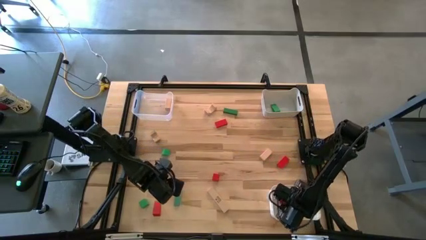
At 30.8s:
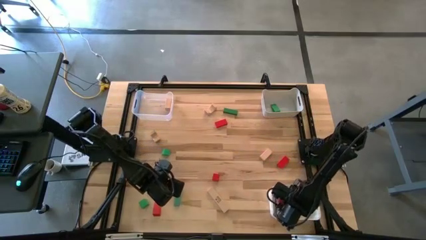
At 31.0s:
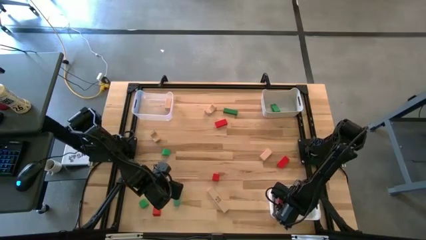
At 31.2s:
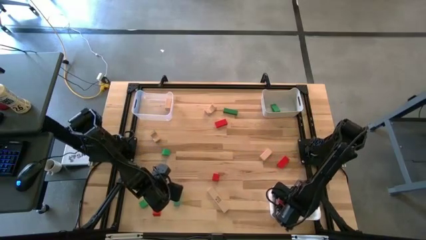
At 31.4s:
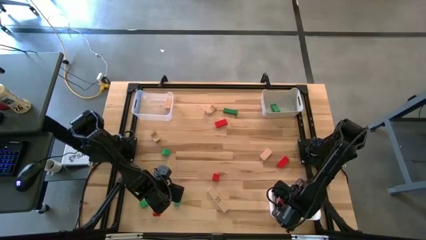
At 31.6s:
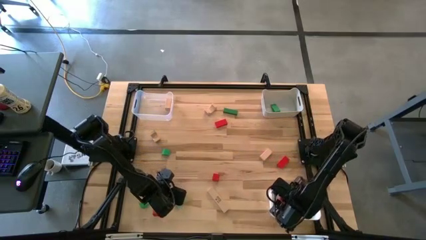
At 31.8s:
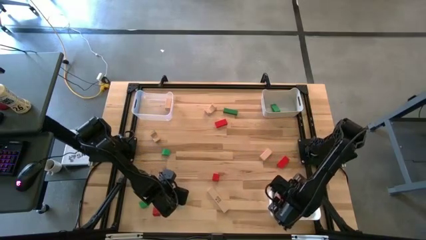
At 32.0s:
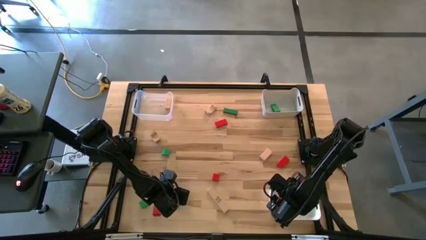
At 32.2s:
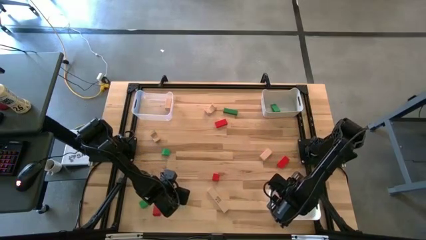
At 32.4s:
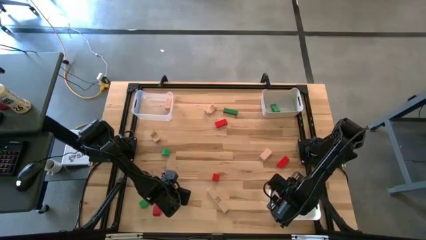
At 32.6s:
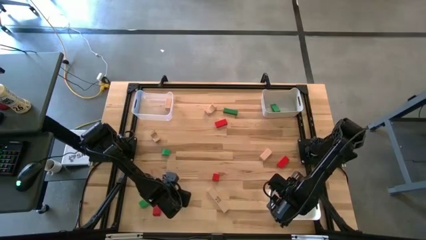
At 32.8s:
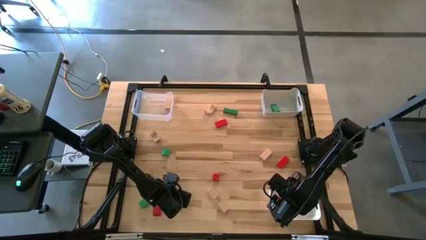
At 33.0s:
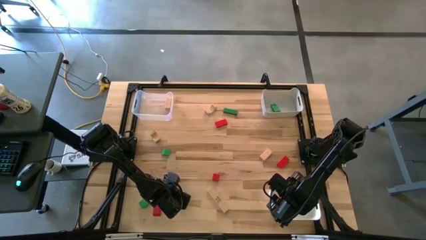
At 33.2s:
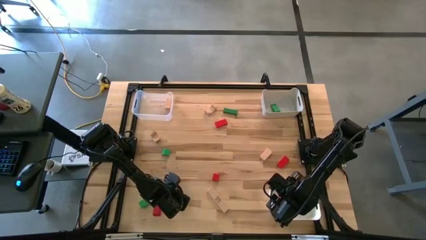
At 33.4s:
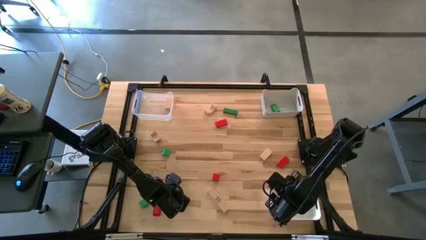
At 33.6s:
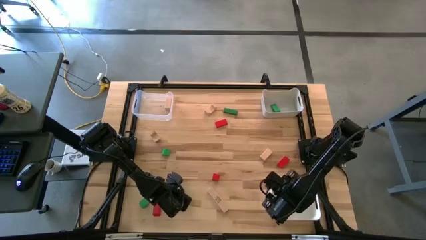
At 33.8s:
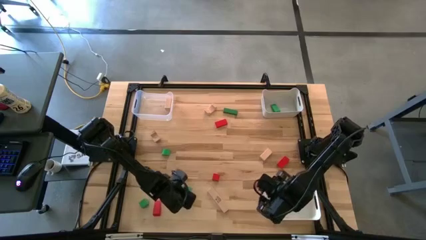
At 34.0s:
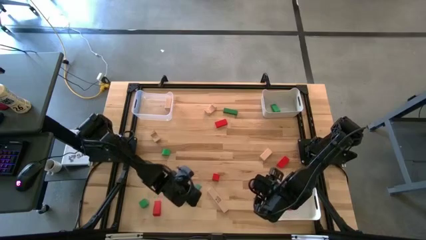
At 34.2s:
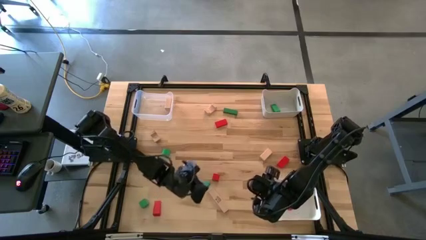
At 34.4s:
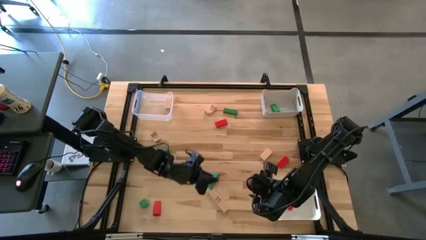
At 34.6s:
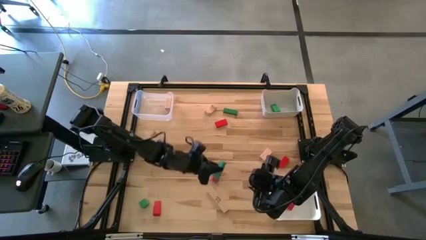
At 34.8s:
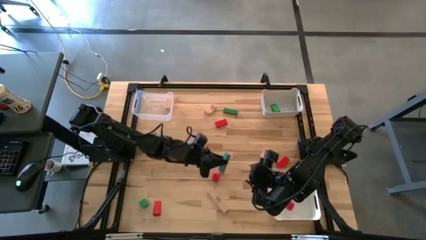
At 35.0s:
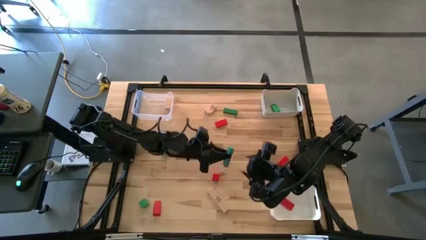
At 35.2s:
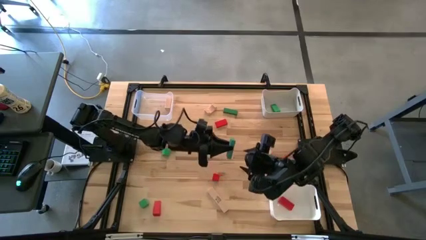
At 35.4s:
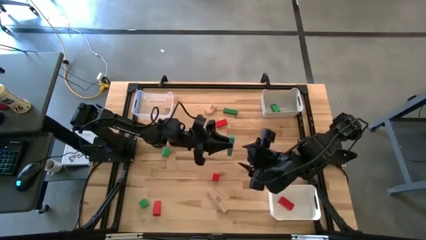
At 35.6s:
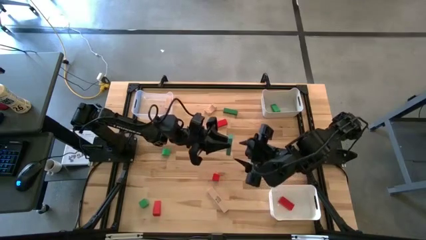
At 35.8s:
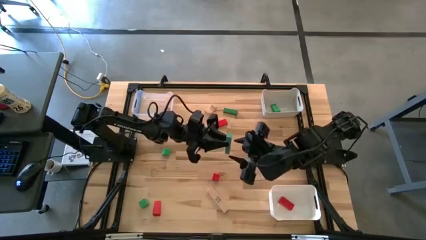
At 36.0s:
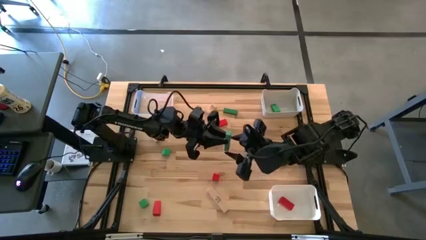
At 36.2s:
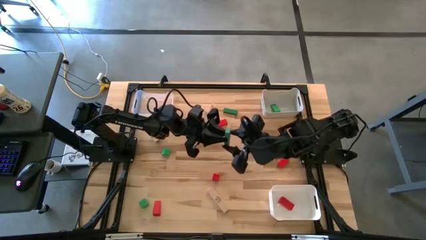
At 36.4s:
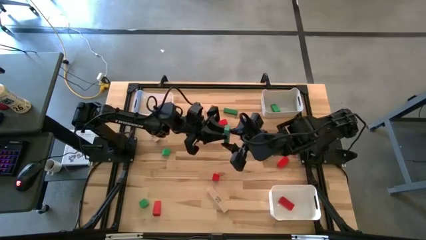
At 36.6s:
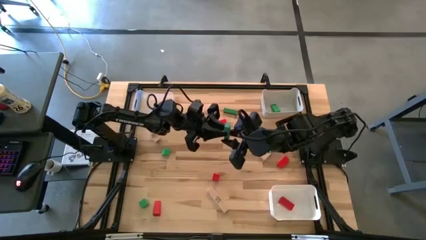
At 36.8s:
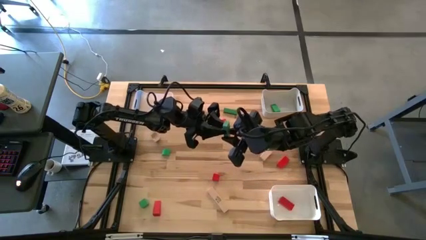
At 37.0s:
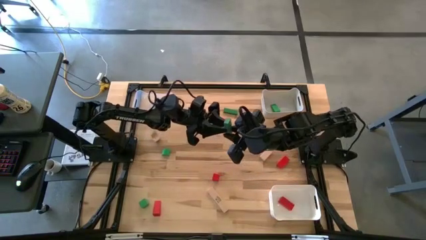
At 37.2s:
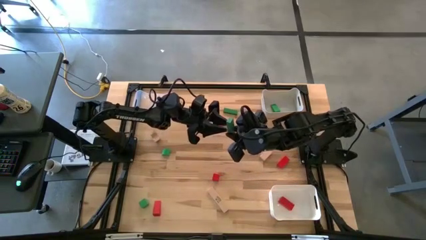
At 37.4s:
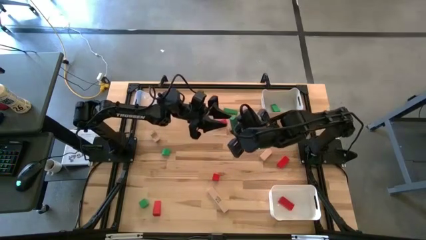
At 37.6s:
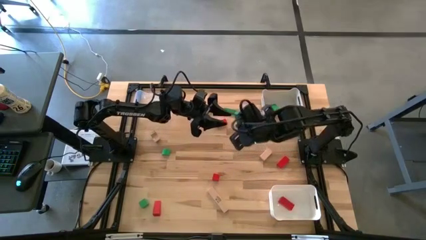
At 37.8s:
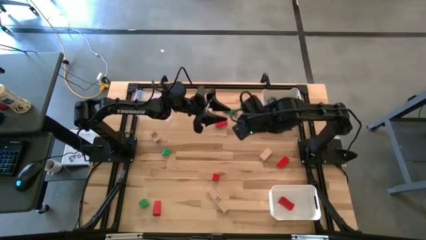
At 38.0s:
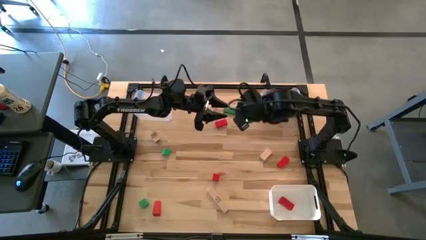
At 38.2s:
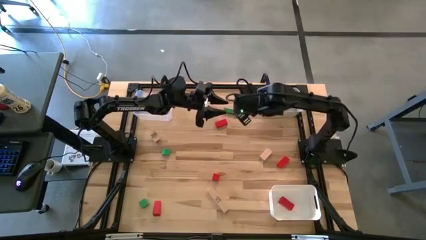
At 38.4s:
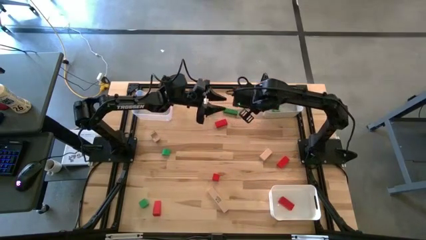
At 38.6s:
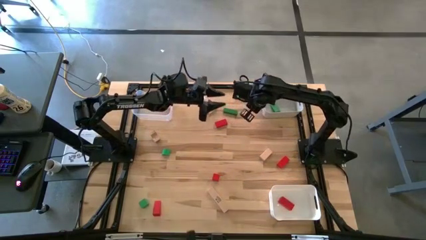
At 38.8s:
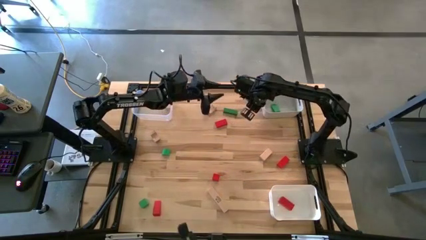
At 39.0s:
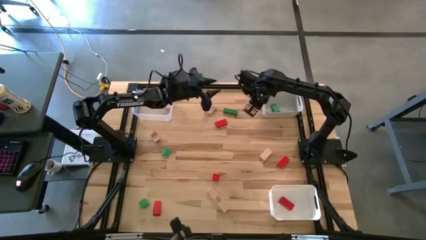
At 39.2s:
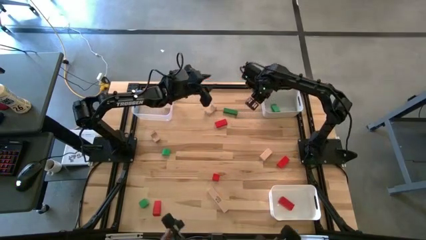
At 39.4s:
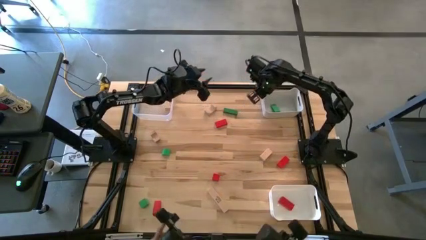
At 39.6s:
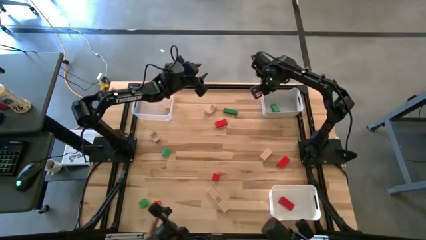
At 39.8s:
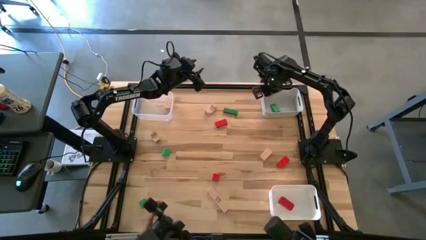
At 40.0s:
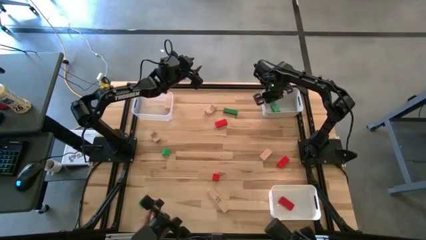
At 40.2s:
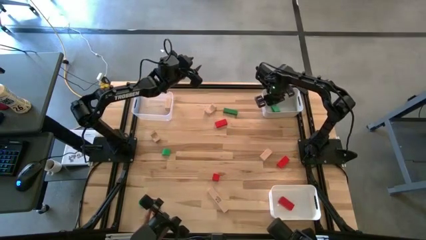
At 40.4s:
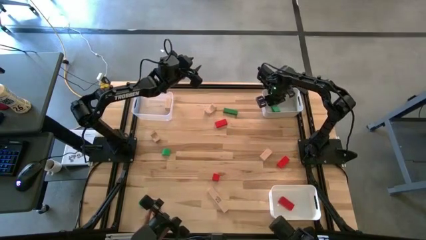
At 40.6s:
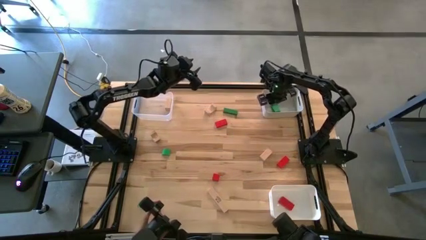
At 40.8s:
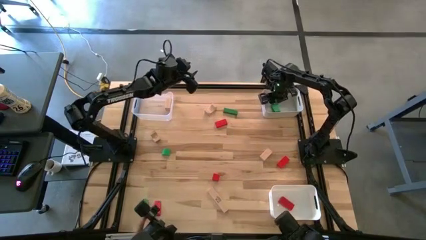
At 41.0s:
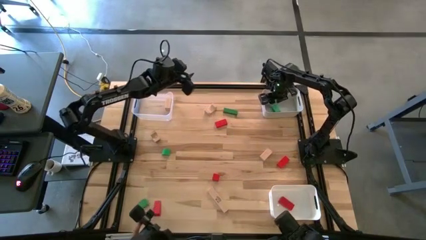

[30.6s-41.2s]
Task: Sort & place blocks by color
Put the green block into the gray bin

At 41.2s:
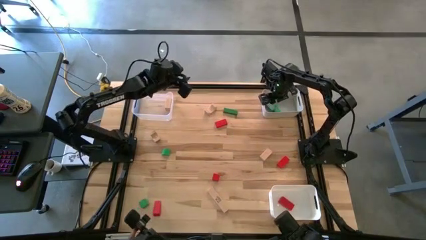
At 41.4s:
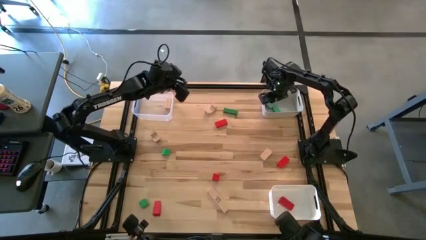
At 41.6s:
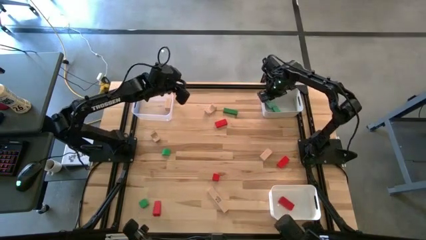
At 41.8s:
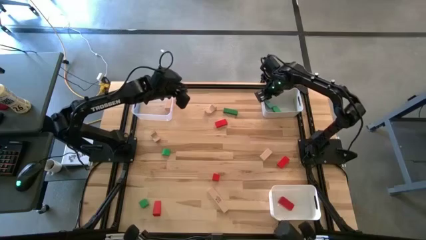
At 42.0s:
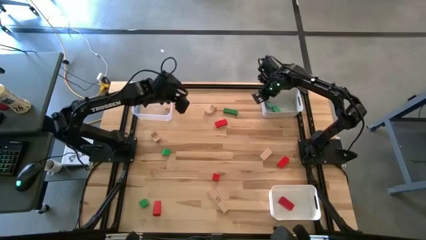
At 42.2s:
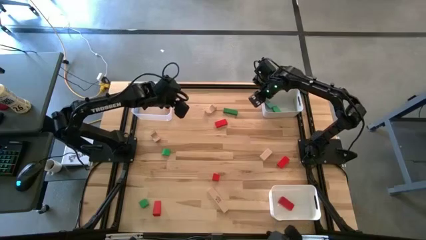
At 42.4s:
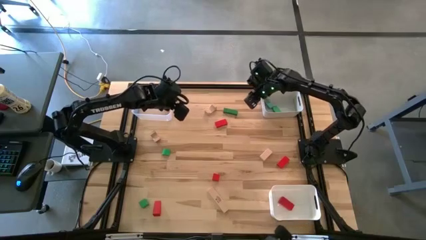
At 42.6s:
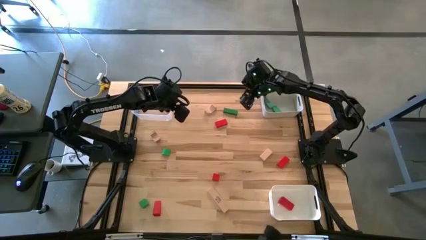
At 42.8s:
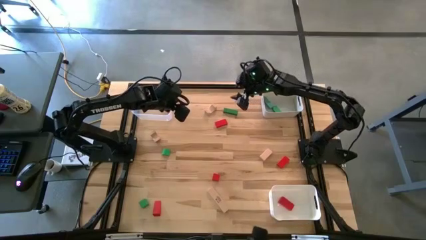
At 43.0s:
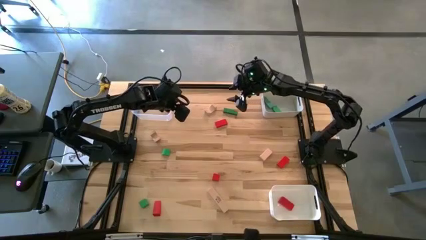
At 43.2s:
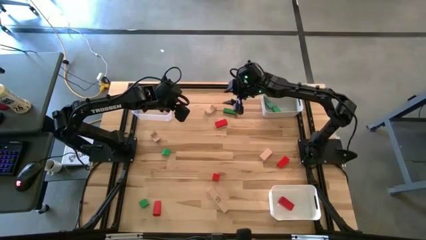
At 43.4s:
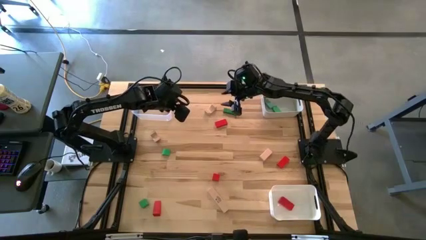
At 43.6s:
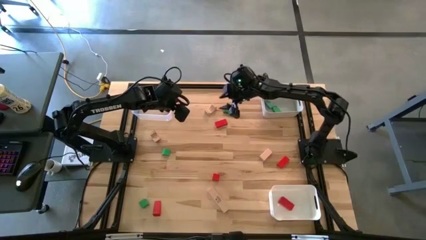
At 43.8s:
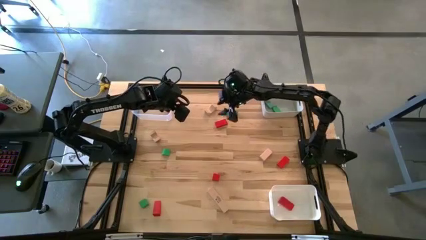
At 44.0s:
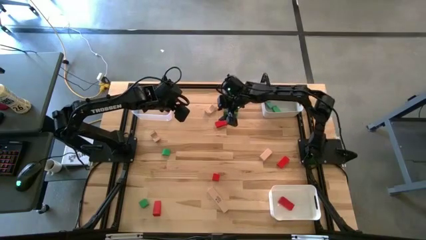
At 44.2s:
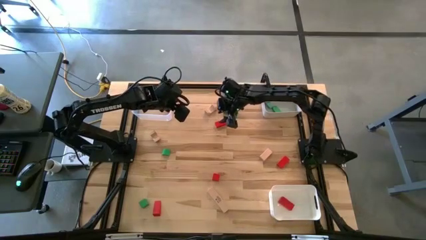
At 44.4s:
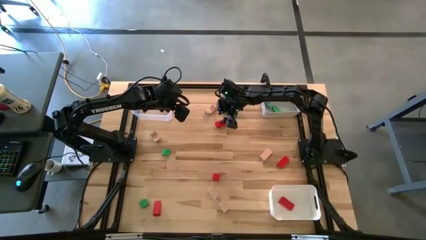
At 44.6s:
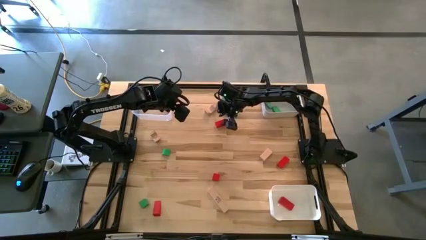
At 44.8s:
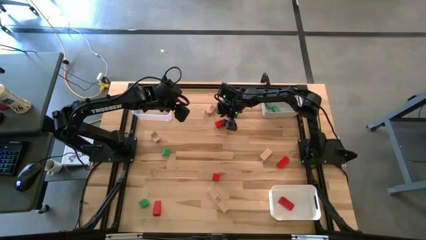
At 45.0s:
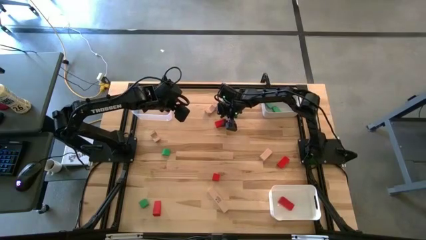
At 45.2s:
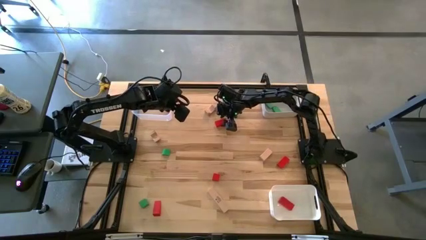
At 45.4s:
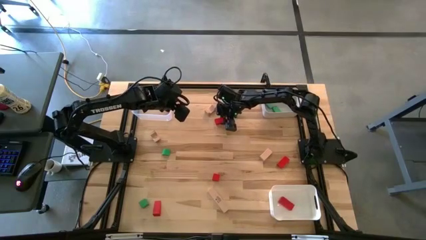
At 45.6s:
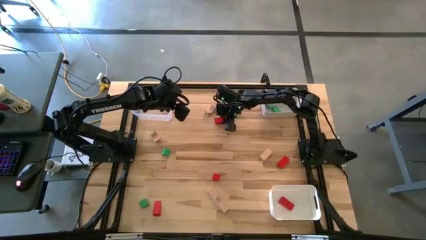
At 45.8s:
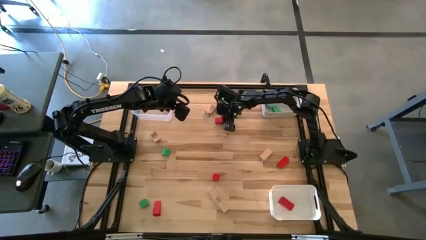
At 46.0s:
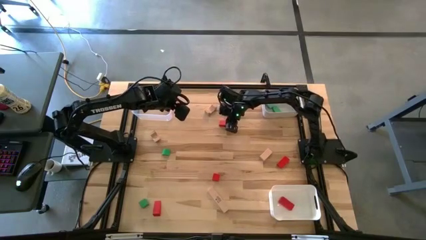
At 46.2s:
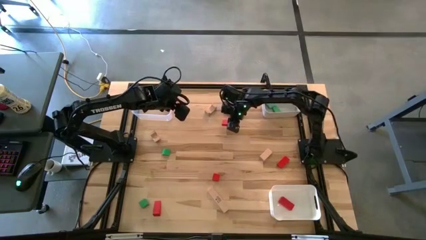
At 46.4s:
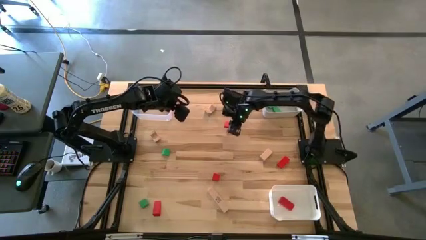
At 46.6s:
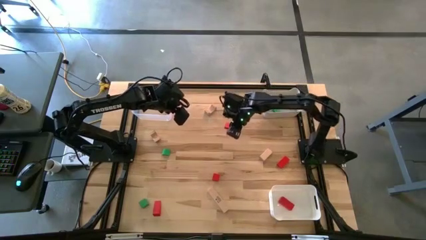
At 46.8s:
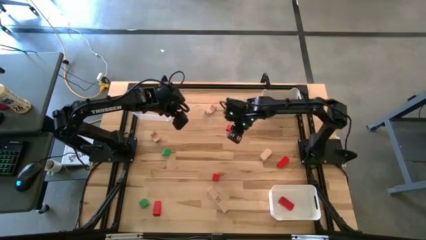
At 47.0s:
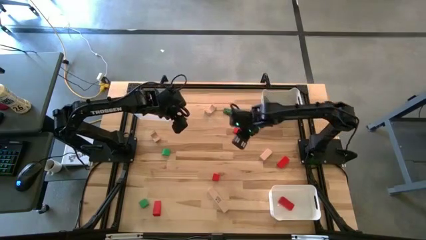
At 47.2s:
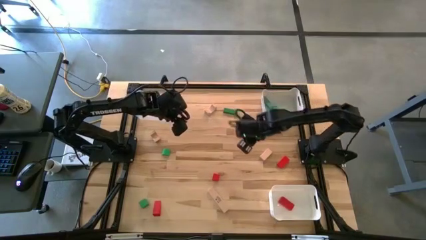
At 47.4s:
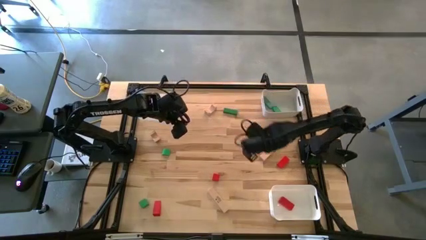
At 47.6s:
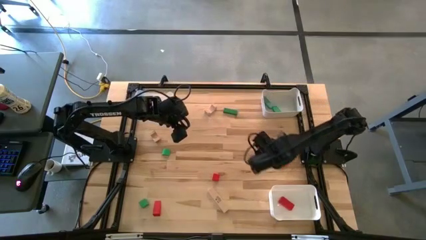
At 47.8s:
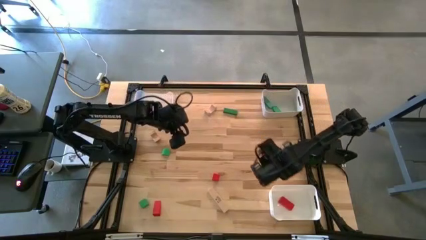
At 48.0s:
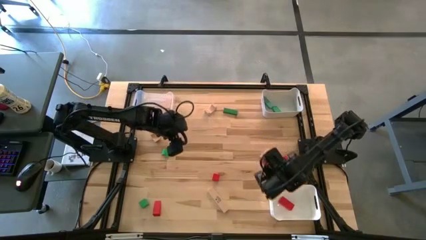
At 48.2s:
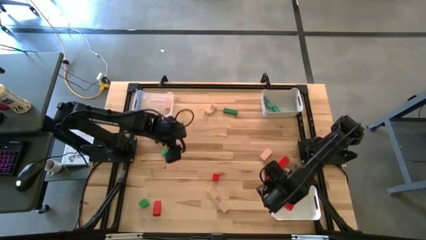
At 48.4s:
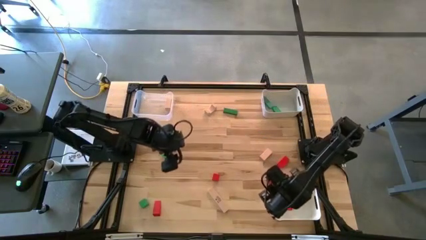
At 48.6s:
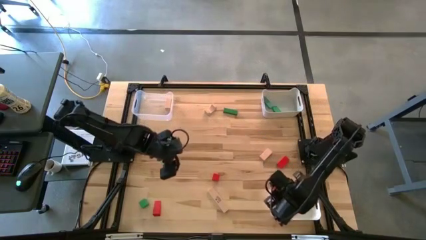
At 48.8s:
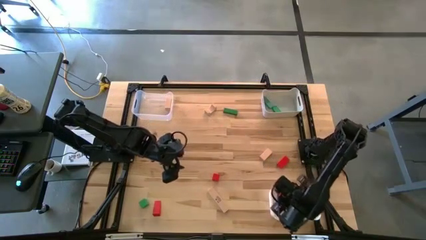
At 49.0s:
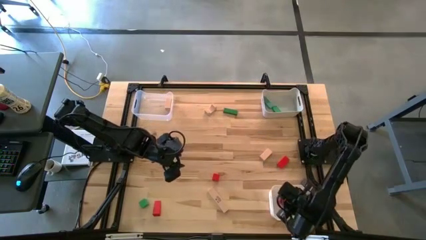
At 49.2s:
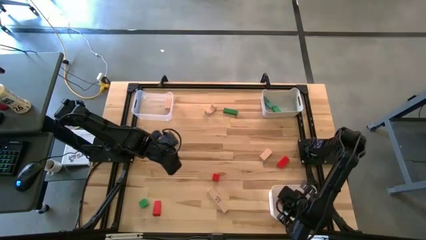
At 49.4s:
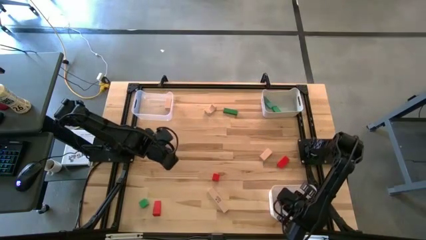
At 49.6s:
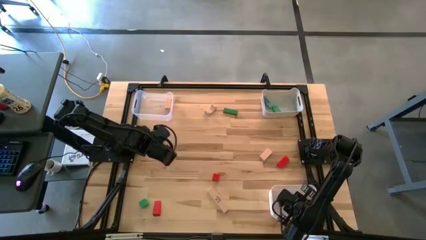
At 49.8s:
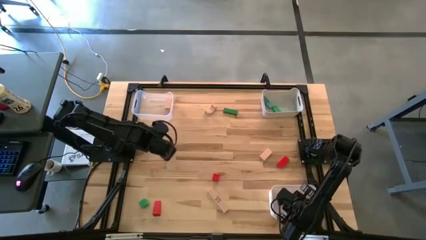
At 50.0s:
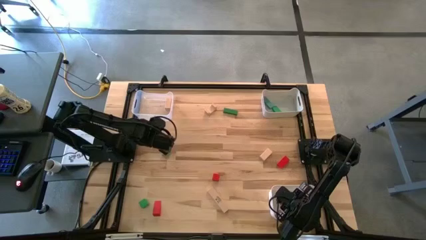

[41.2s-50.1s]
Put the red block into the white bin
